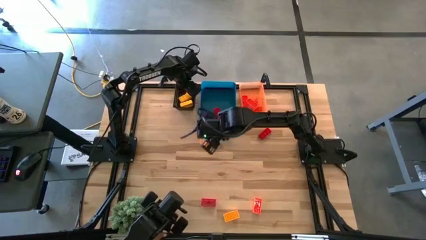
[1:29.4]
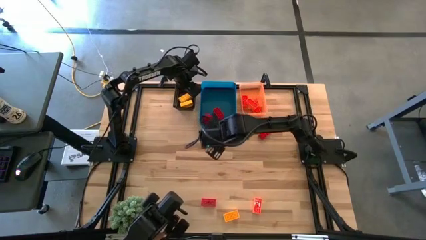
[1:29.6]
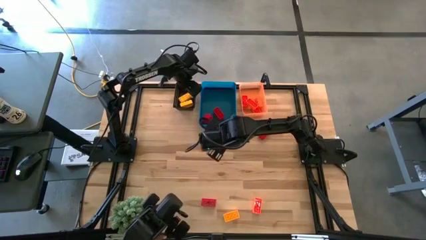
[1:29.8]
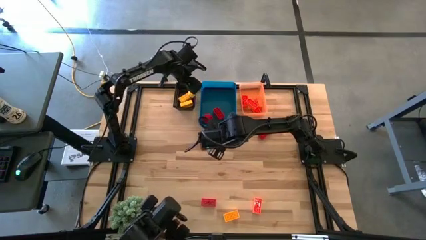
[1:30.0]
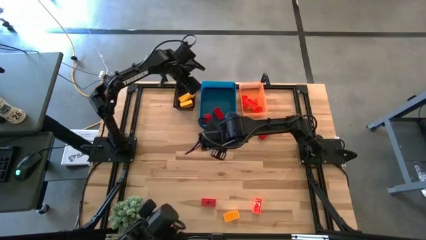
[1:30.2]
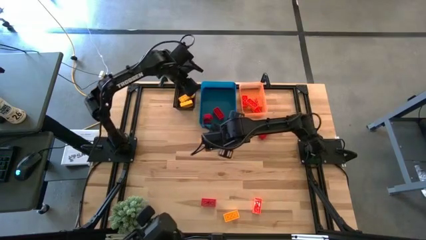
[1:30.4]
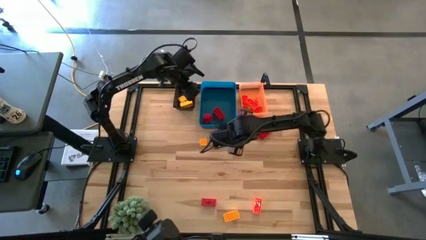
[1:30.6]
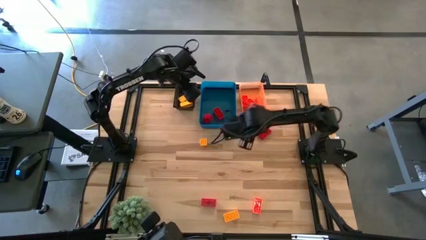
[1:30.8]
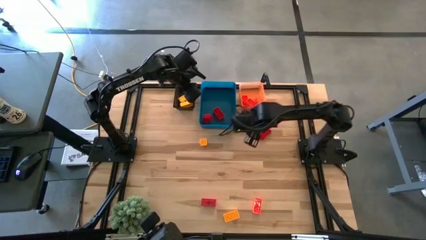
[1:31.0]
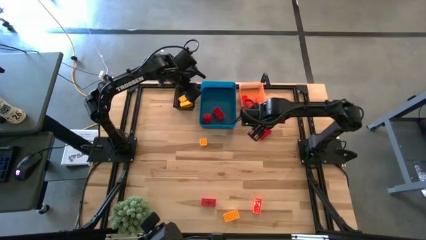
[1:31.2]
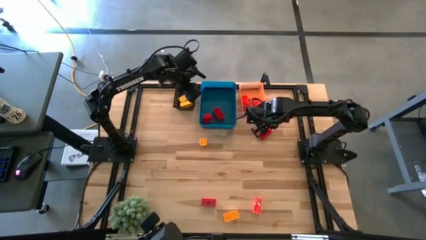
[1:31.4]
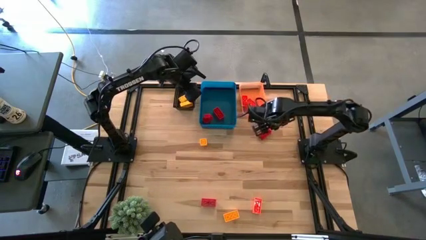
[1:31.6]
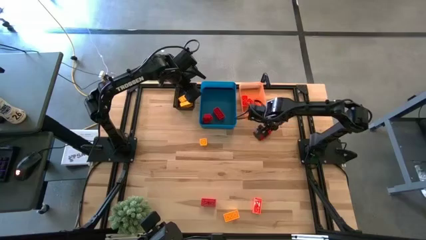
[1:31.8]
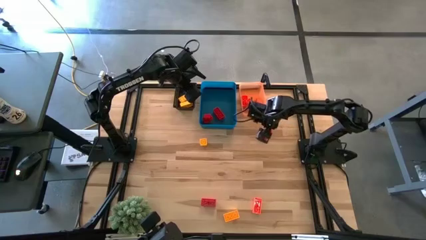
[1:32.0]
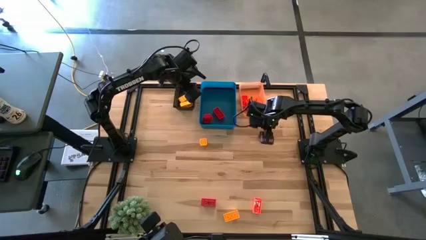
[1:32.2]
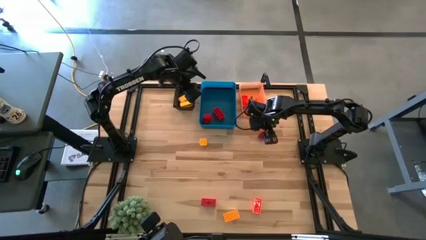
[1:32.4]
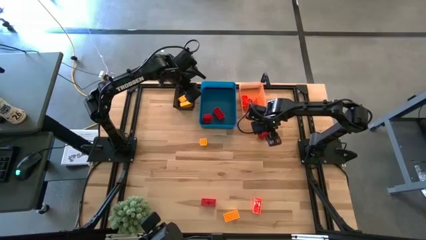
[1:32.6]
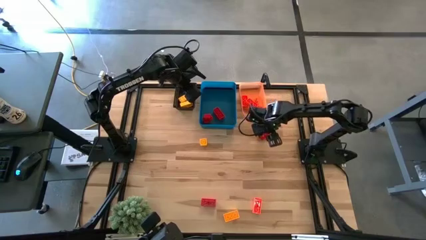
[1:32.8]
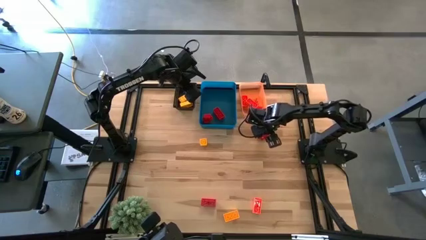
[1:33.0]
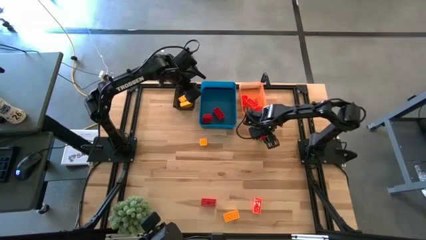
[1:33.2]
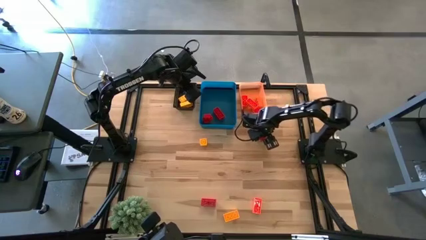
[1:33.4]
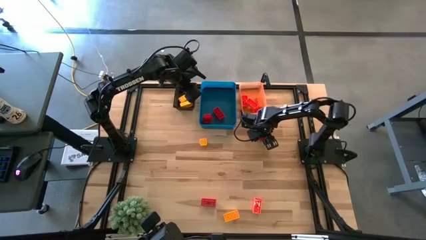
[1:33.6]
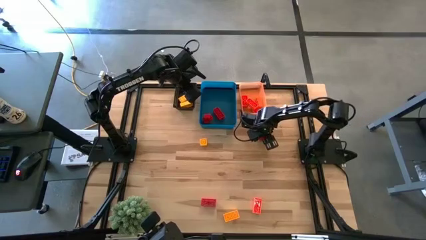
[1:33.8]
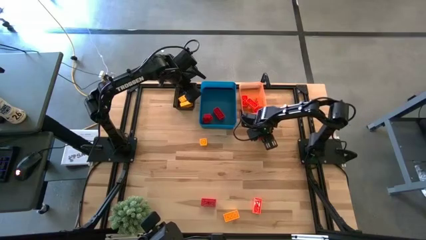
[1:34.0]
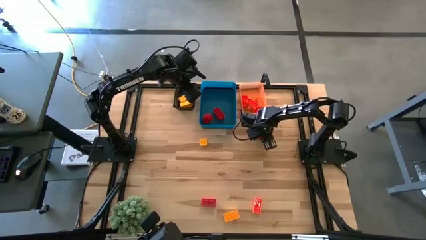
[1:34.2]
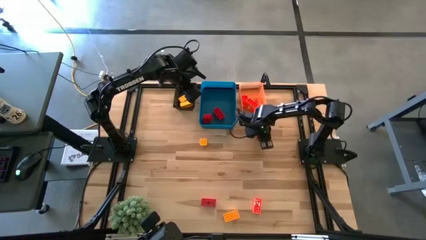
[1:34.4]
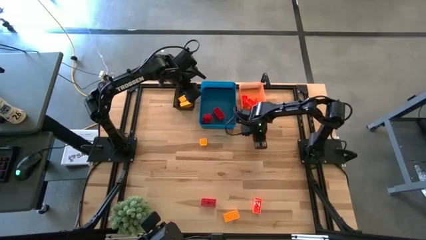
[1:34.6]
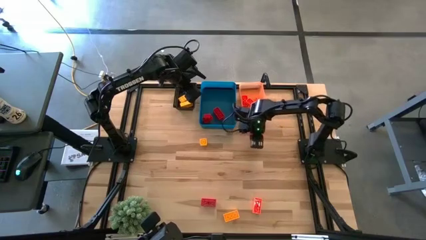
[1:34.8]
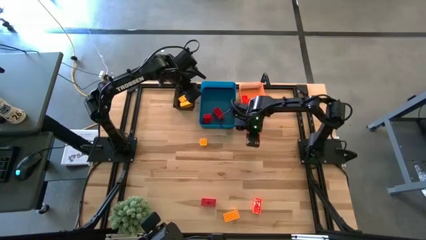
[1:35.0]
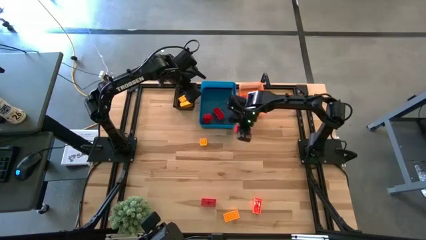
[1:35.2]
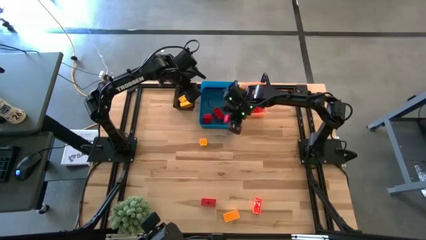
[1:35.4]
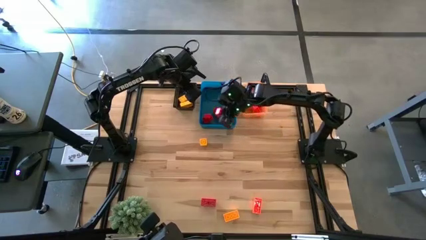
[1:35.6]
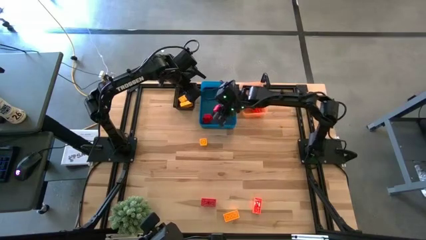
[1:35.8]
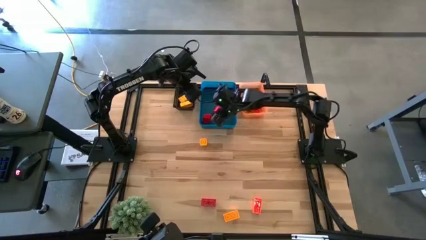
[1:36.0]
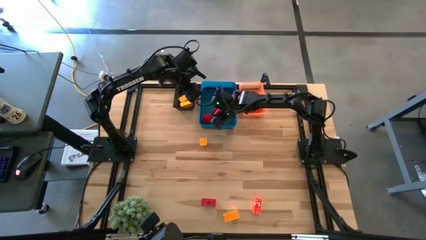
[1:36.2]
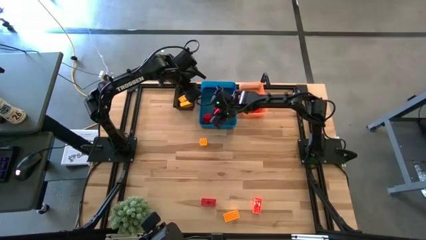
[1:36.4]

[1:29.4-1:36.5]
Task: Sort & place blocks by color
Put the red game piece into the blue bin

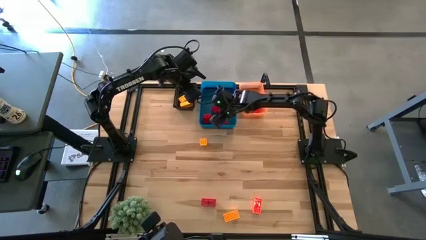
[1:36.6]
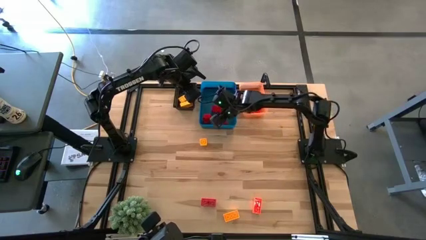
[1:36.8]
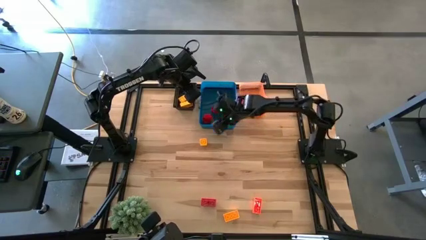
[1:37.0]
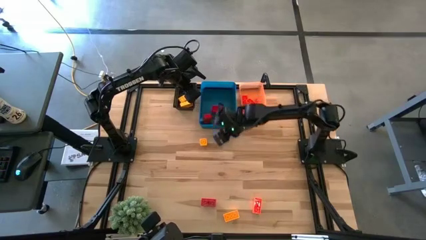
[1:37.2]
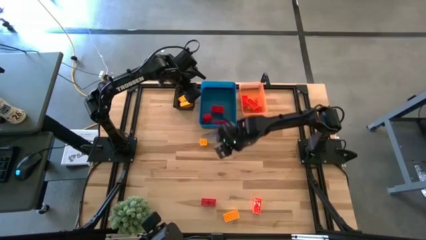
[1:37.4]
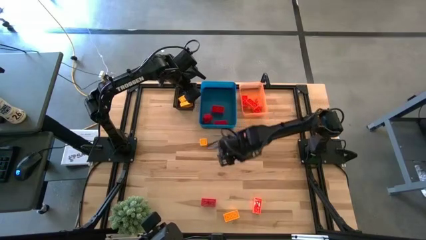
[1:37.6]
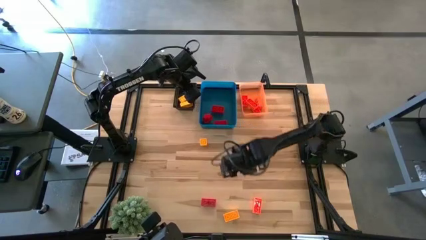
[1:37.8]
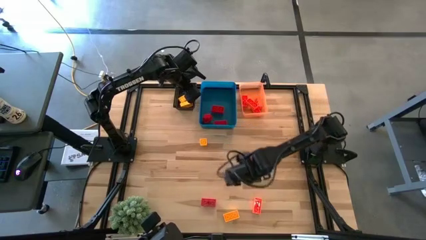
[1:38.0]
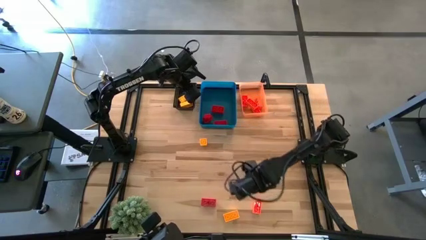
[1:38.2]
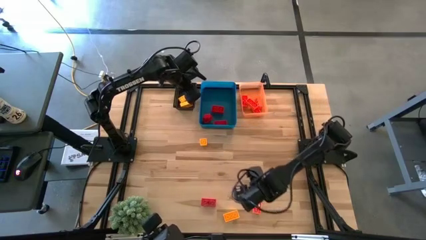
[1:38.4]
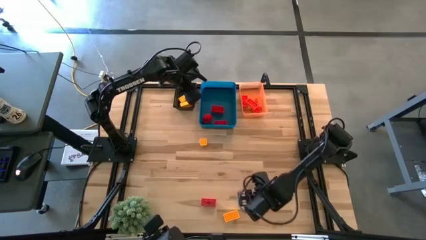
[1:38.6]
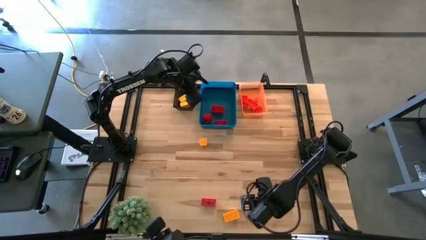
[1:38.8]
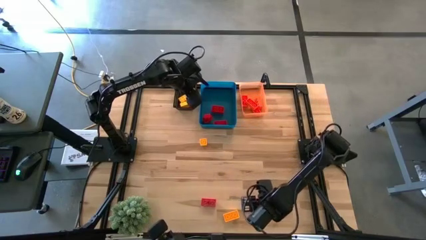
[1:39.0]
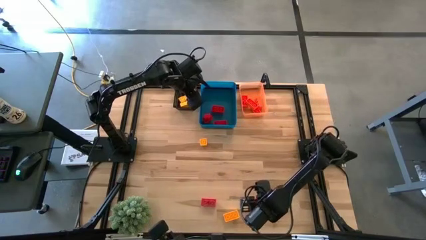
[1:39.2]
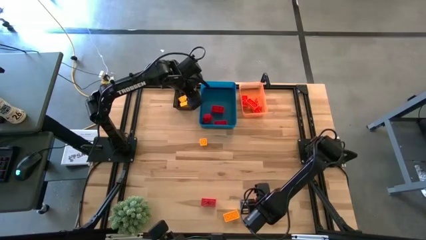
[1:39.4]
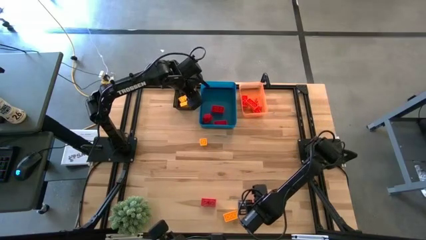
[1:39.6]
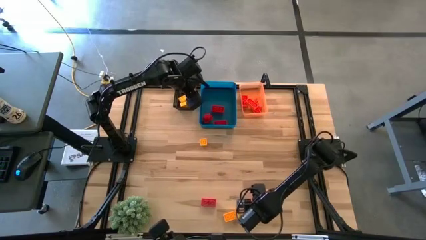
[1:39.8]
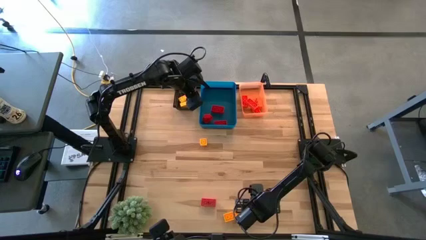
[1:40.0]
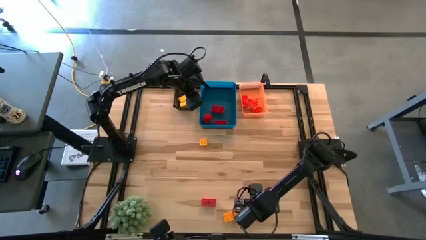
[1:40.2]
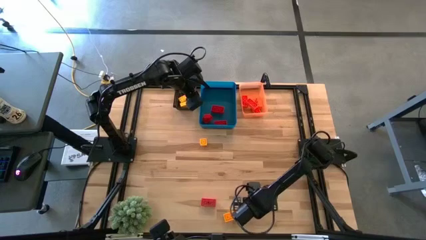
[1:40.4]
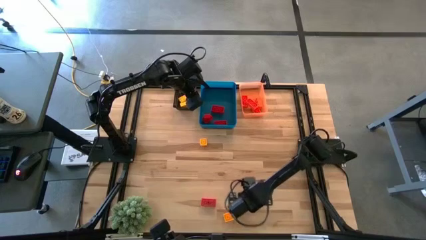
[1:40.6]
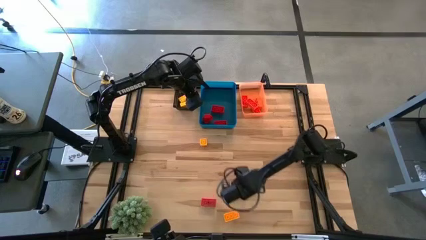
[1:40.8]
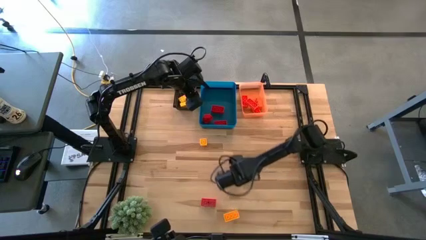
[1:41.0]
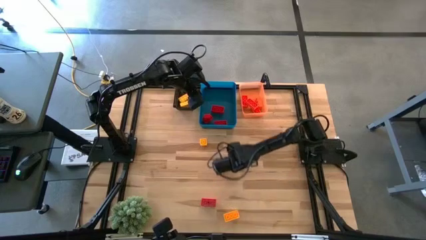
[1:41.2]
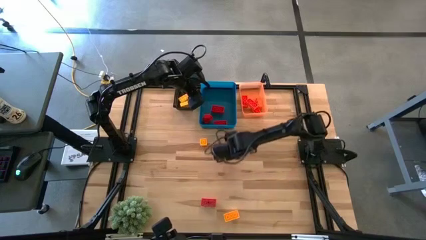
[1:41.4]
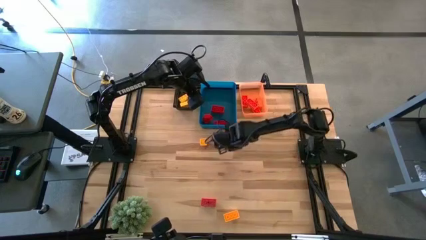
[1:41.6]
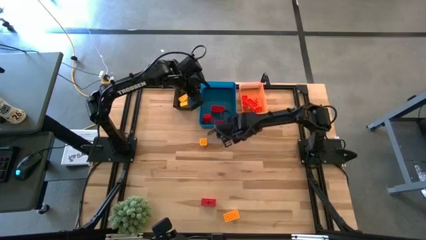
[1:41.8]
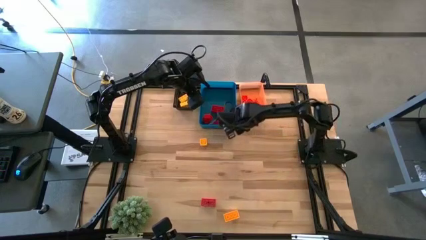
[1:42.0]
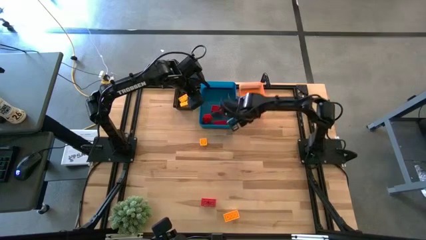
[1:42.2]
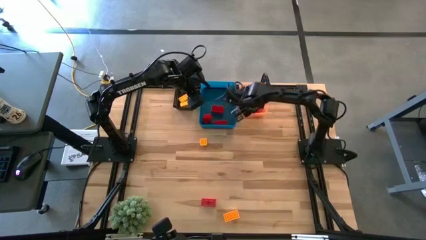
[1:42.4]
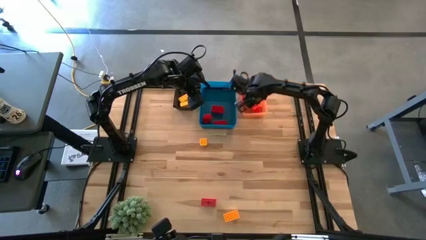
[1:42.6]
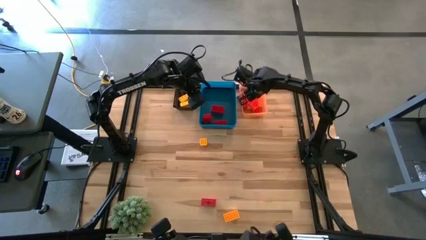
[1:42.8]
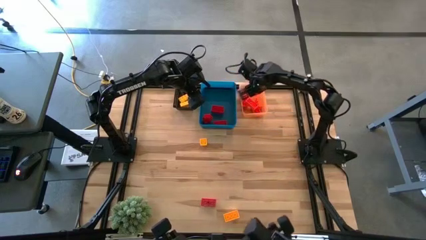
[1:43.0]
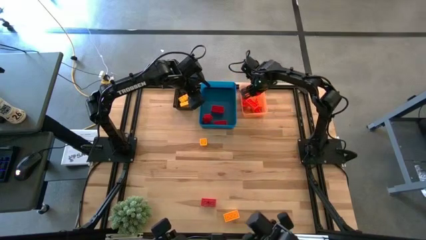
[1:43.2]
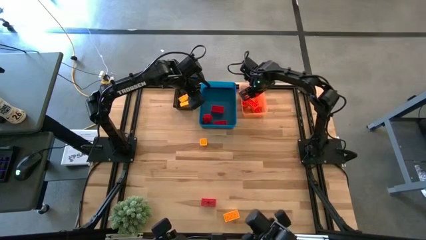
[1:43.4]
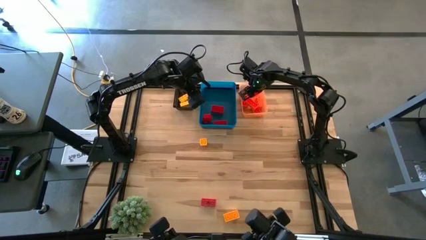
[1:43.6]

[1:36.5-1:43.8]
Put the orange game piece into the orange bin
